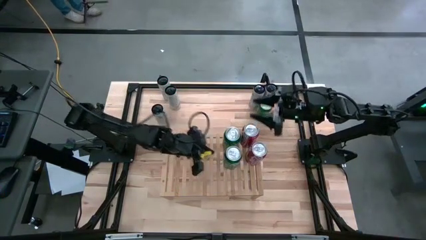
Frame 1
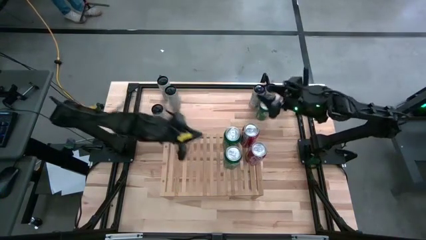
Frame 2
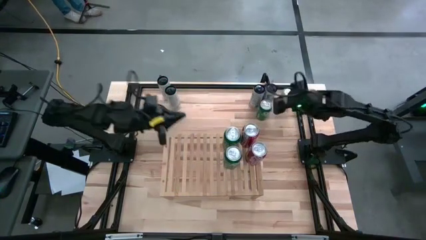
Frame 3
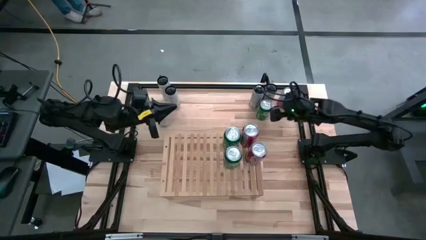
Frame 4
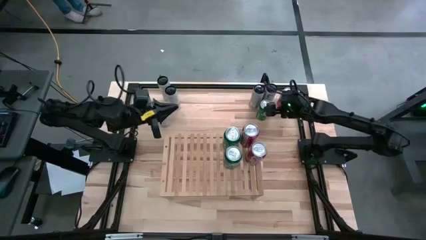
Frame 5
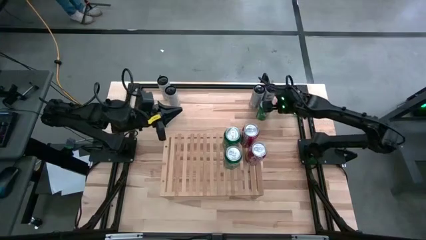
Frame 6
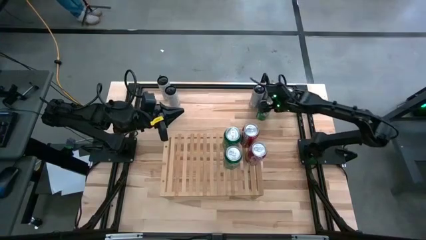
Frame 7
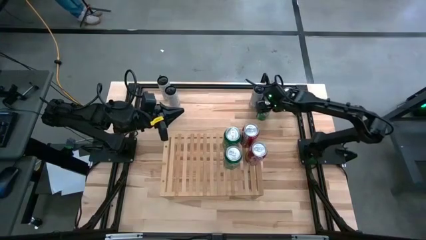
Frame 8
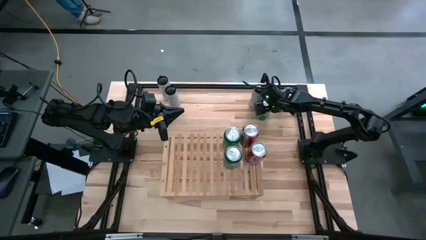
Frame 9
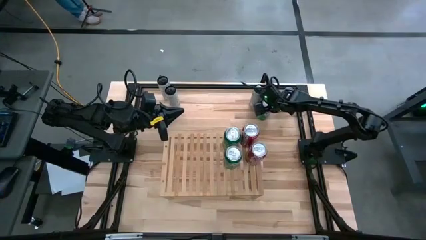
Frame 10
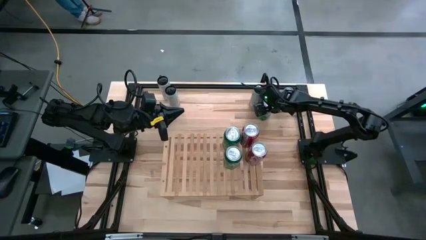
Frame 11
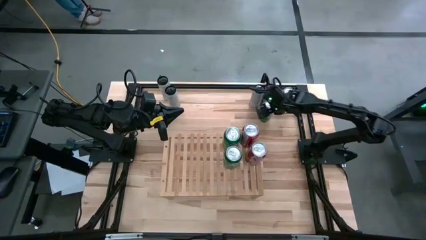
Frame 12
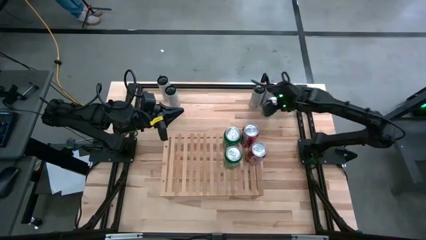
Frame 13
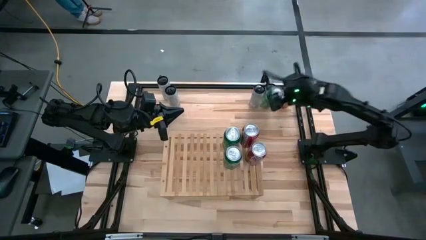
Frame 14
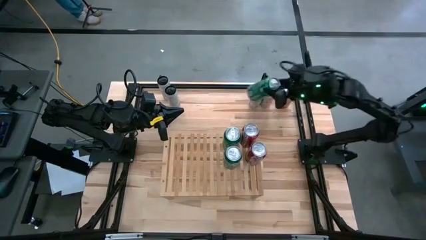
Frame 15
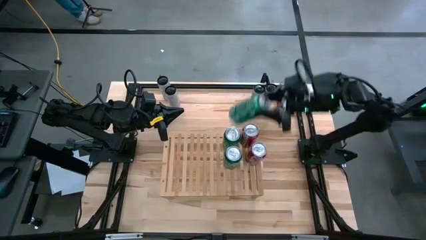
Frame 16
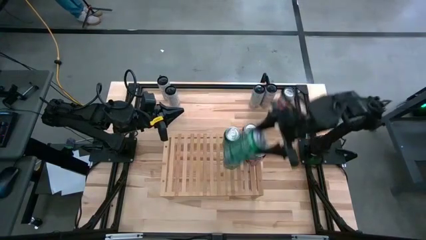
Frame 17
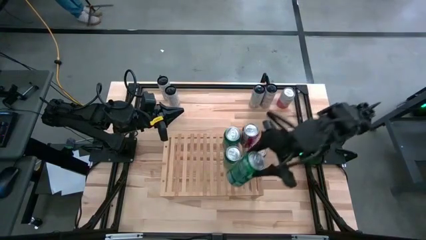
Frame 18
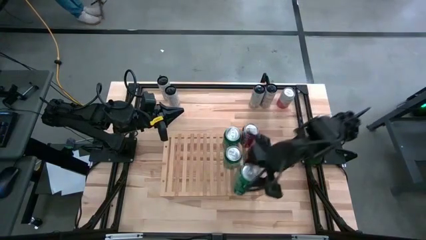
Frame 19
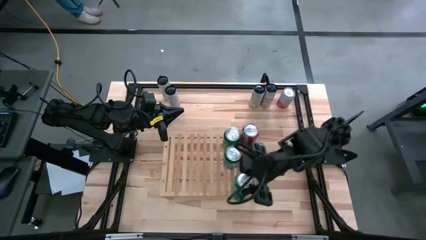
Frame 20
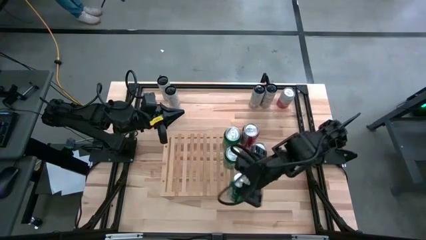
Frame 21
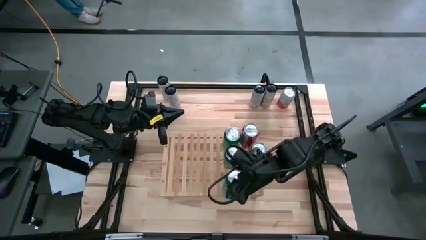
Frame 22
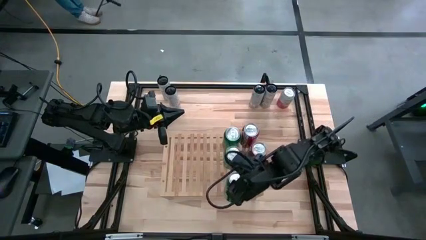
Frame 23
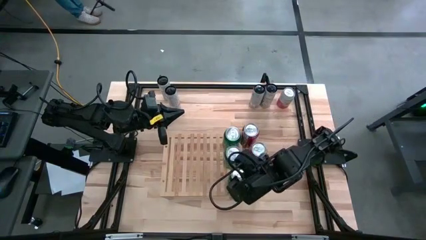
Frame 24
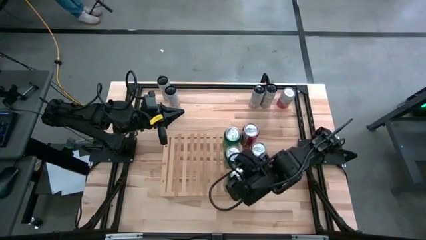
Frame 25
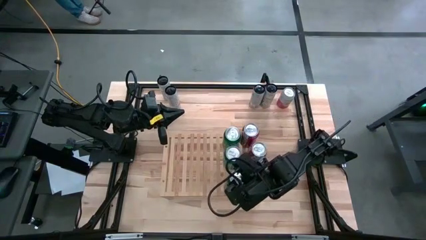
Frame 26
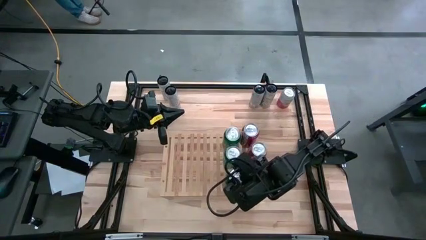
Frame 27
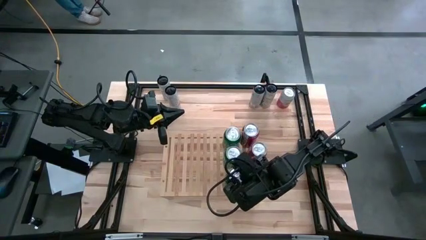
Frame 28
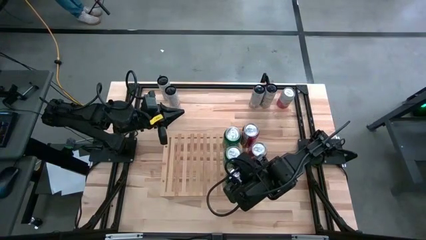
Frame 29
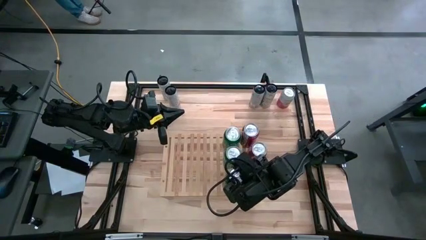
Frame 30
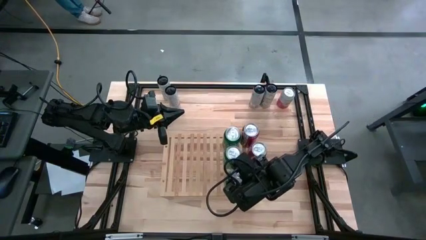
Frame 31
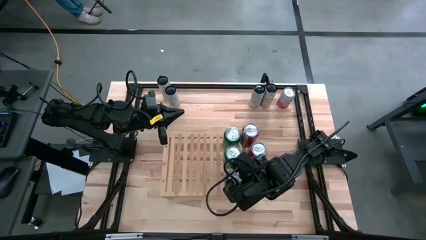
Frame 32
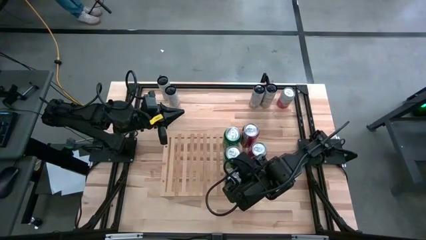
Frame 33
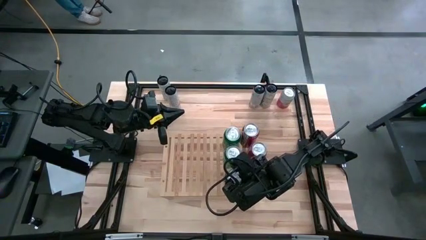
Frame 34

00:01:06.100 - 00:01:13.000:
Task: Place canned beverage on shelf
Put the green soda can on the shelf aligned with the other green soda cans

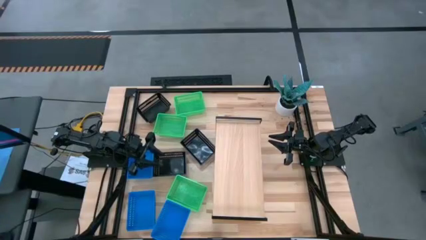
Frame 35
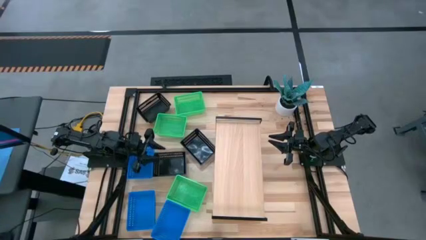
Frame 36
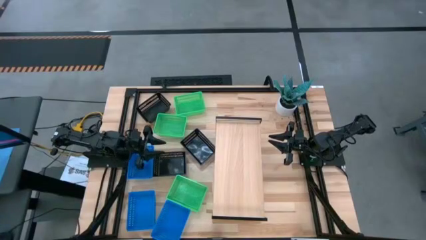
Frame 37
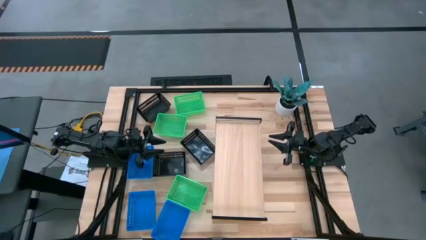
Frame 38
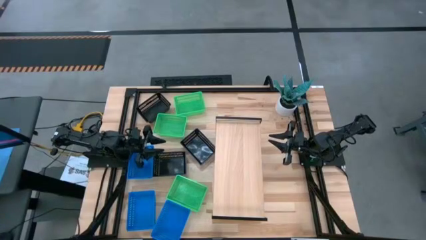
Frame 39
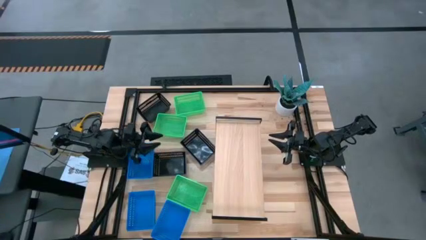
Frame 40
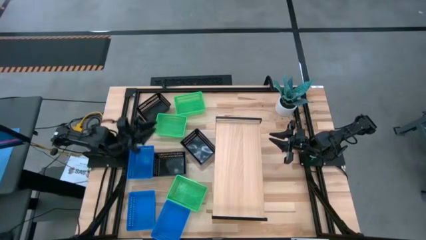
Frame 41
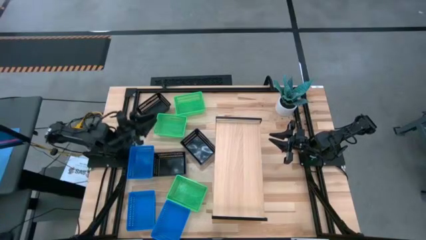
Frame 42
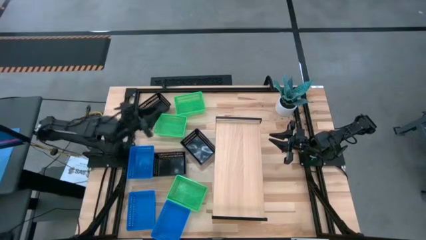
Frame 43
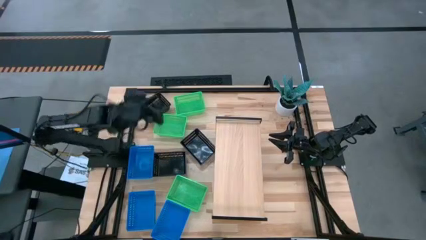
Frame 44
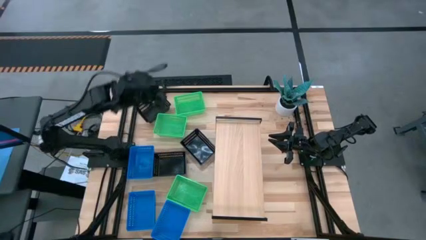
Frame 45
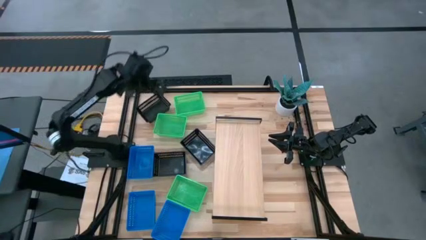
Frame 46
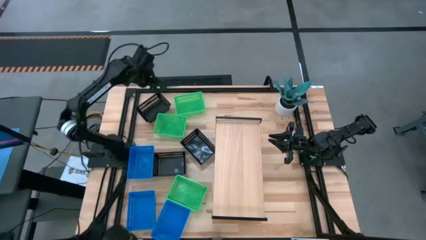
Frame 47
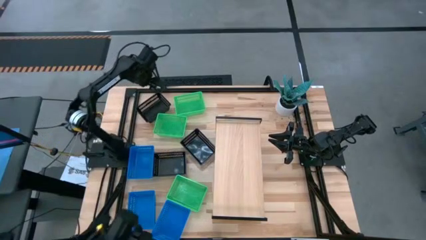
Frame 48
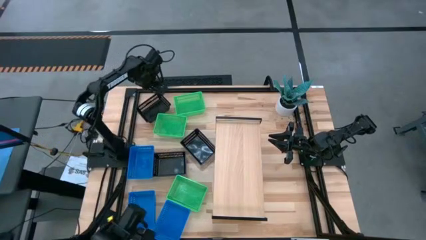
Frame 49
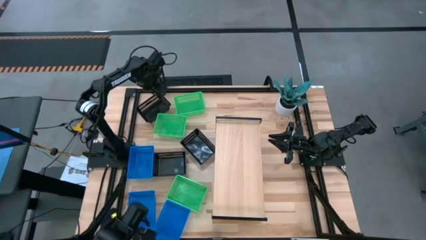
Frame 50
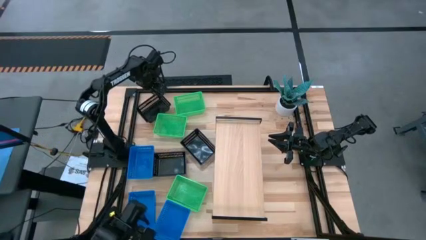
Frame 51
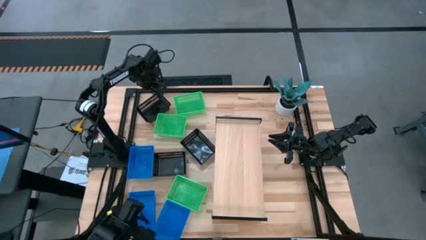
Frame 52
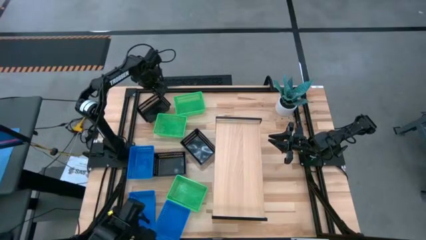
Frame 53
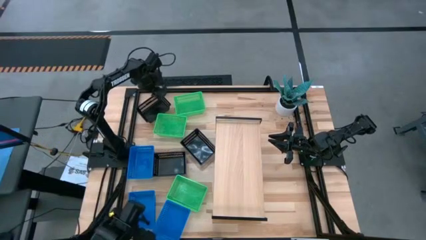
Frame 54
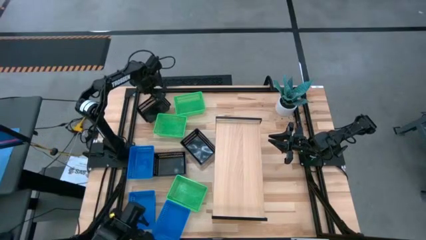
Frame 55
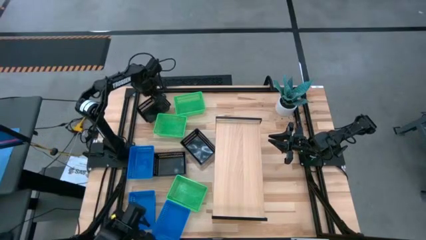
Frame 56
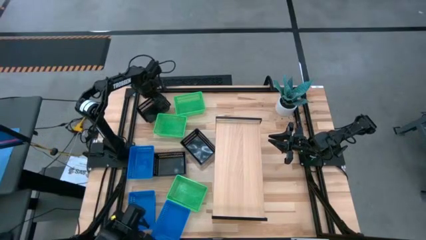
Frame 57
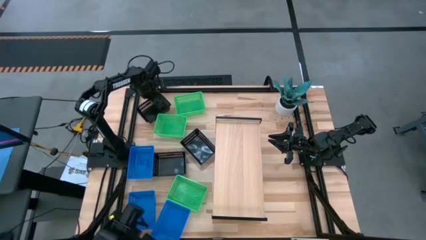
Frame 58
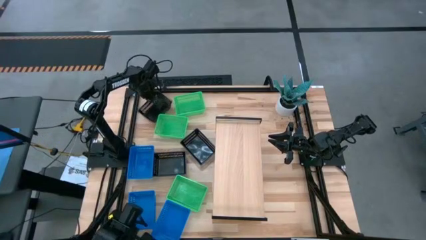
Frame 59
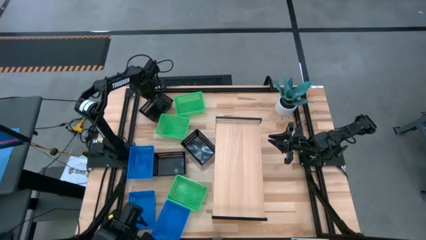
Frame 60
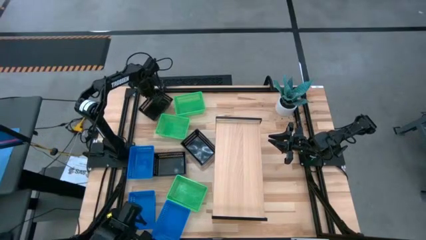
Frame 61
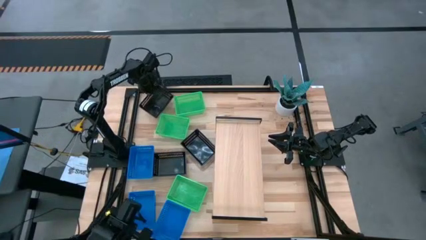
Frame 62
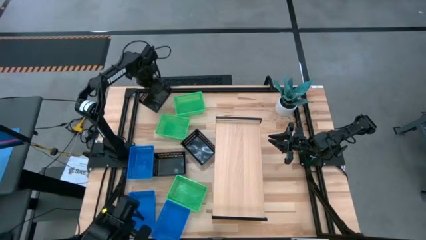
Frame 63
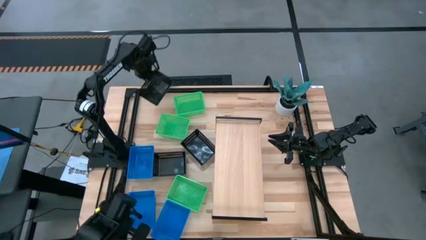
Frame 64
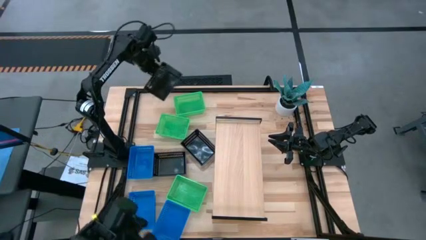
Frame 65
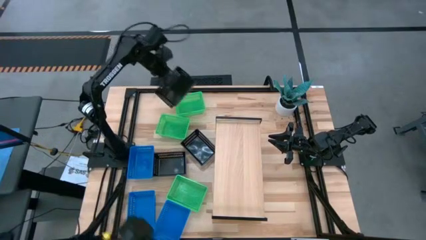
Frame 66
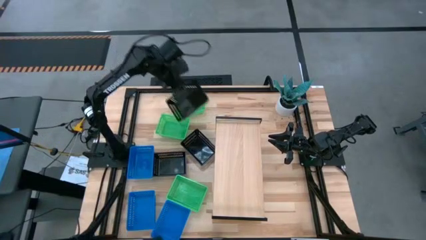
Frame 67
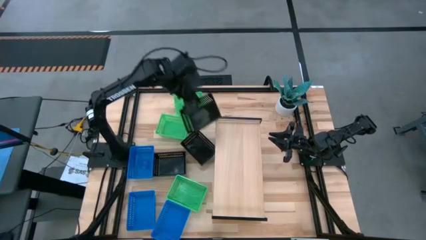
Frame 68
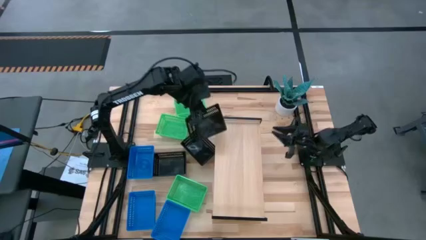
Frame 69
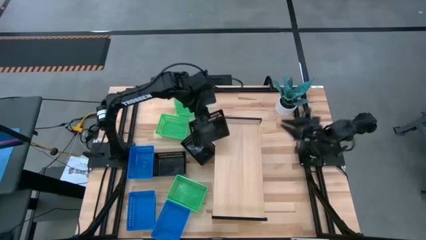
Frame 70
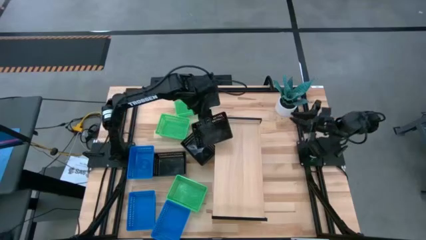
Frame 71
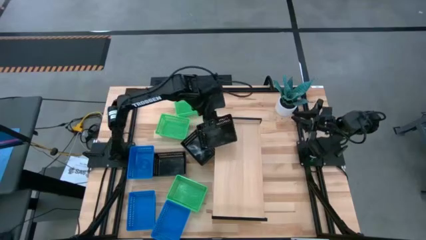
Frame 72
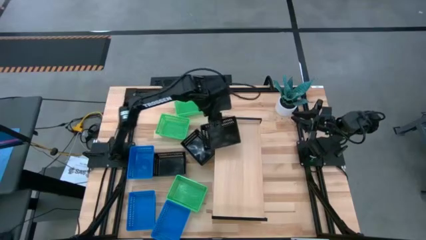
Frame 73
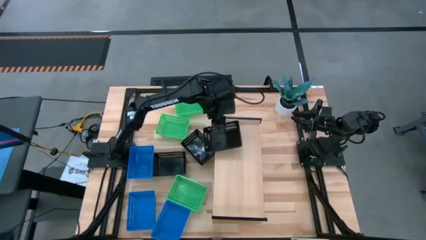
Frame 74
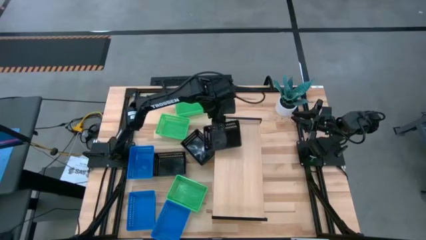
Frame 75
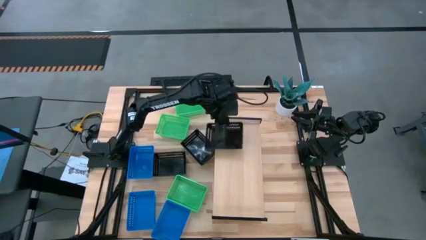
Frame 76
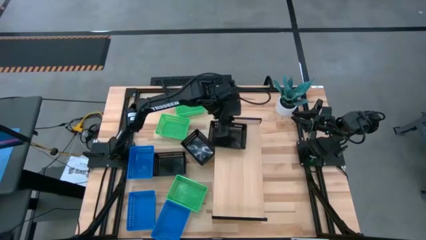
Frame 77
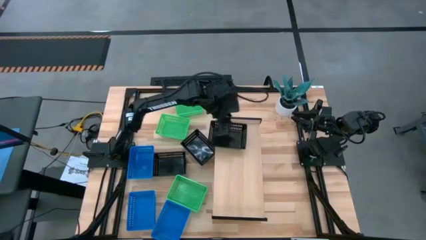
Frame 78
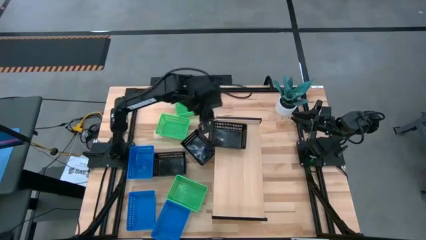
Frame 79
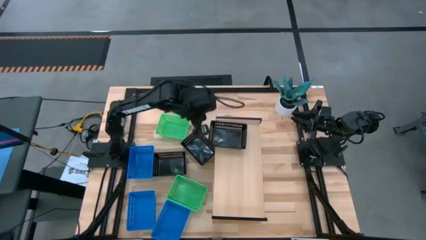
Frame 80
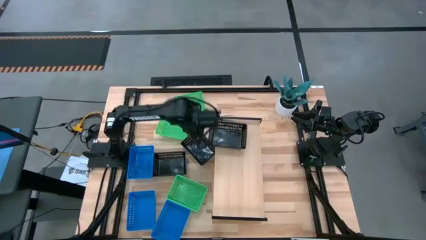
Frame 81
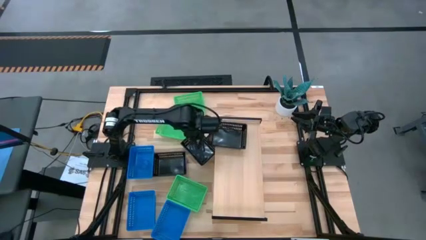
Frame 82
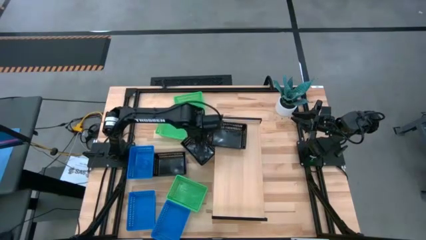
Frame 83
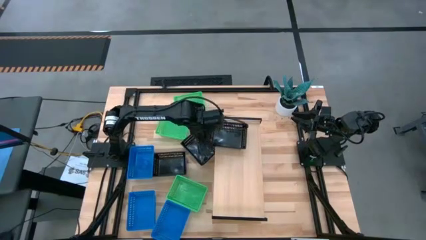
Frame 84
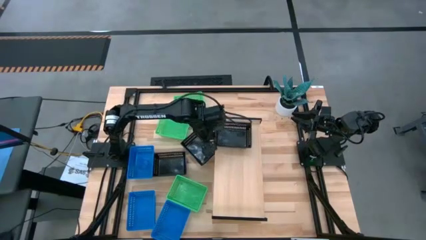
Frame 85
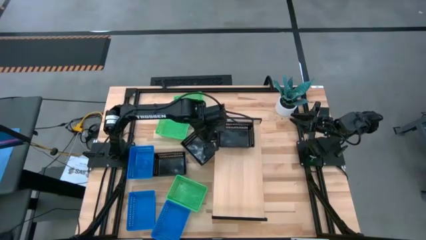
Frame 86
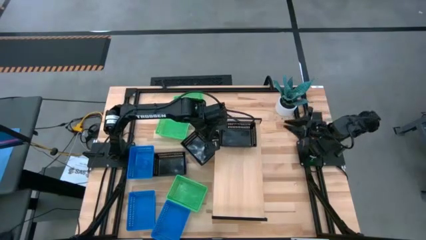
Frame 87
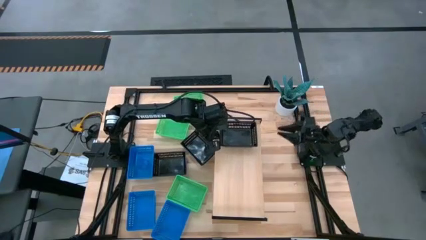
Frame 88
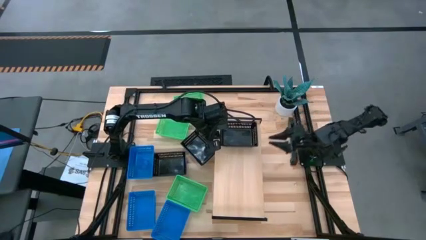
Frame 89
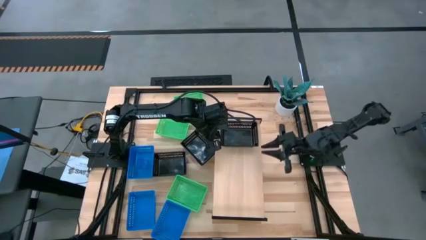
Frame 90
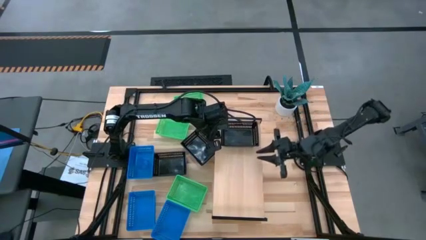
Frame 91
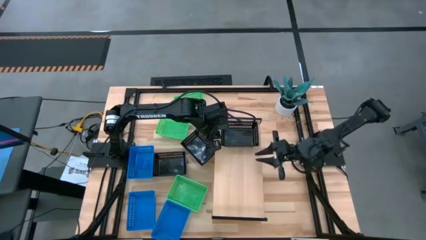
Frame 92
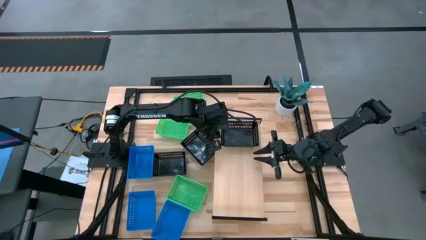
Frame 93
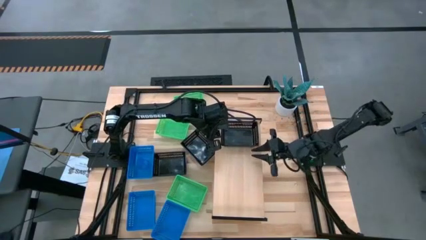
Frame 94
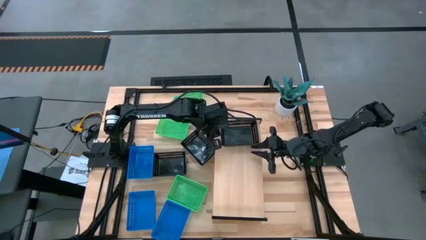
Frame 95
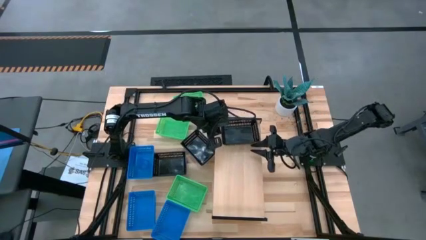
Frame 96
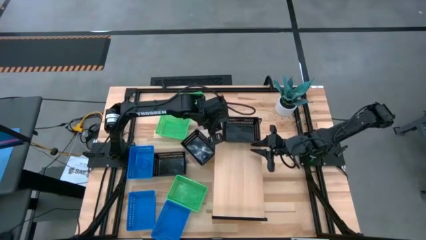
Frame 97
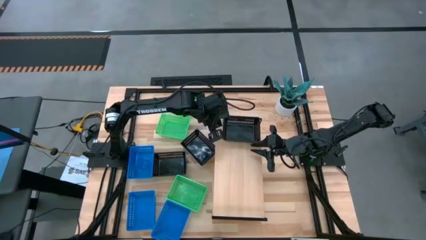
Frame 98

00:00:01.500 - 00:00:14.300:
Task: Stack baskets on shelf by color
Put the top left black bin on the shelf
